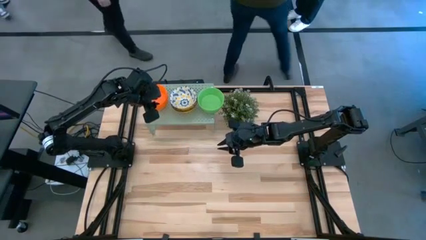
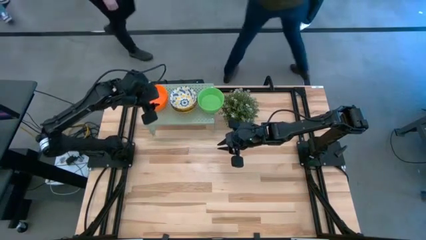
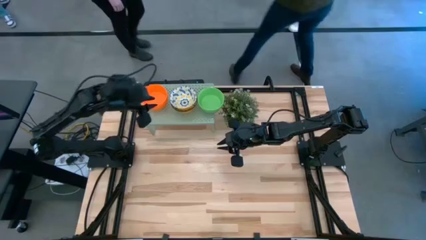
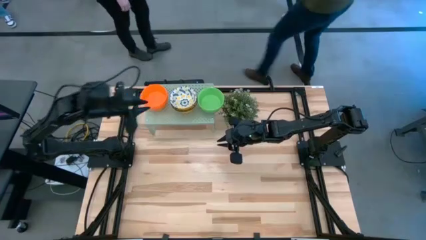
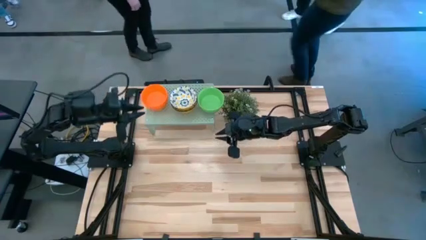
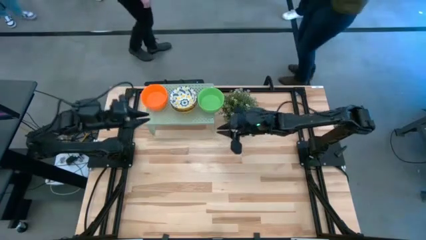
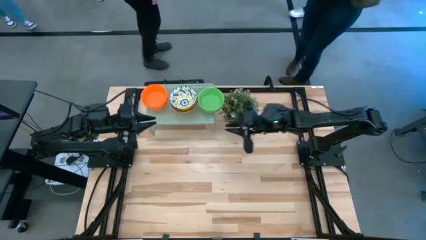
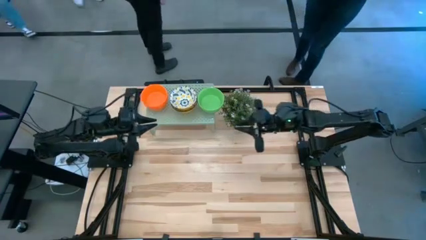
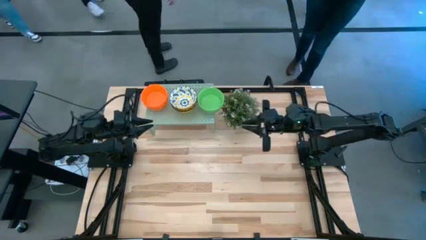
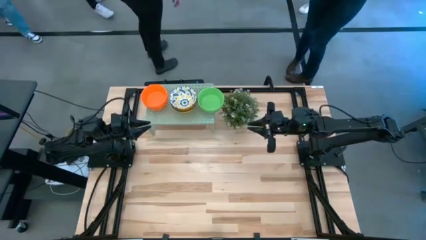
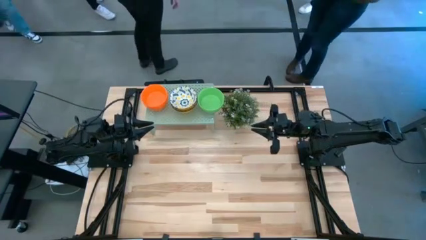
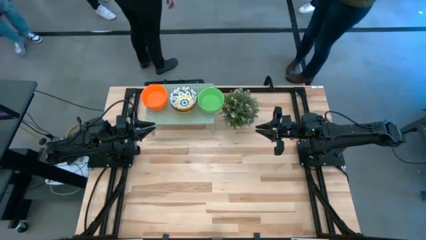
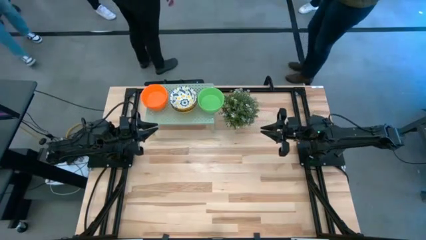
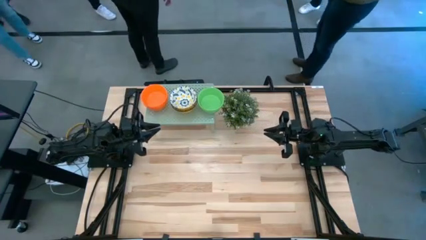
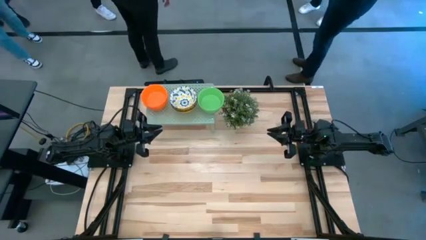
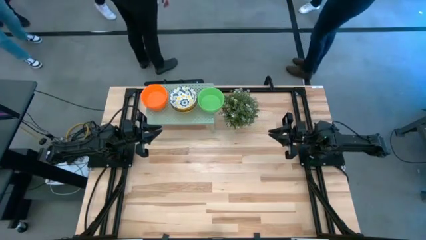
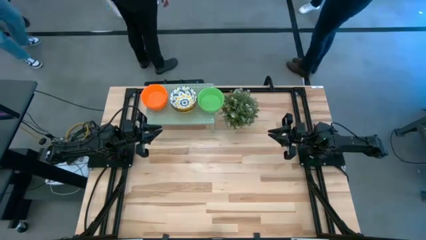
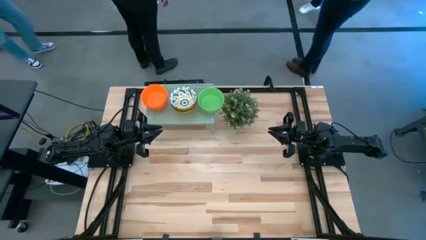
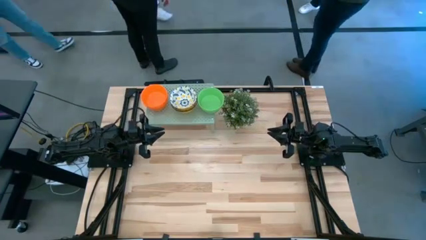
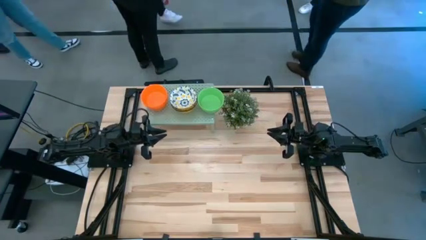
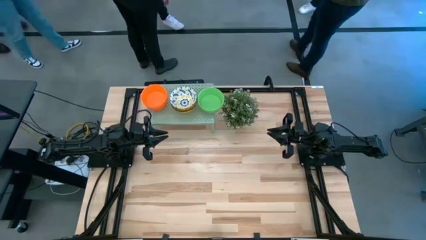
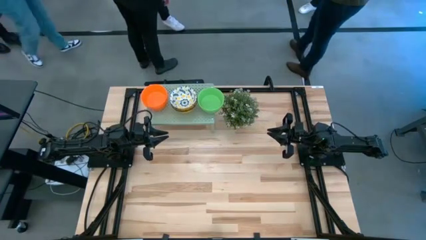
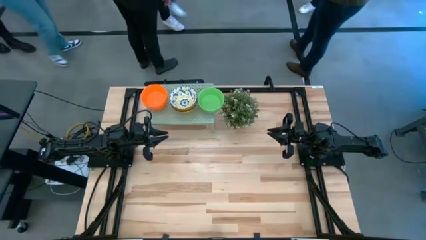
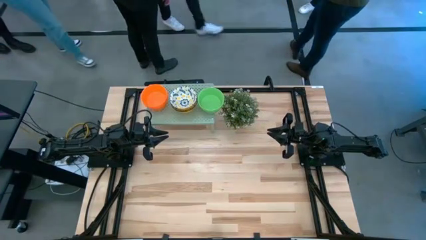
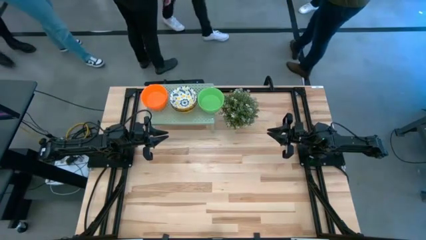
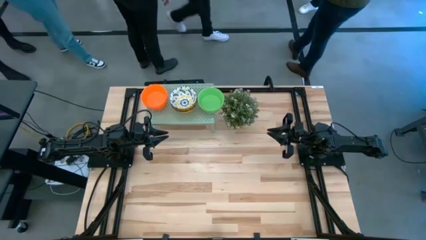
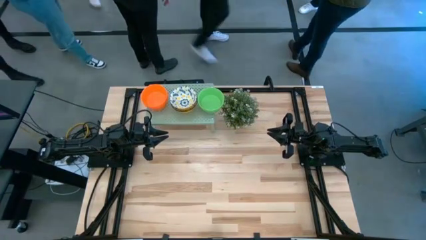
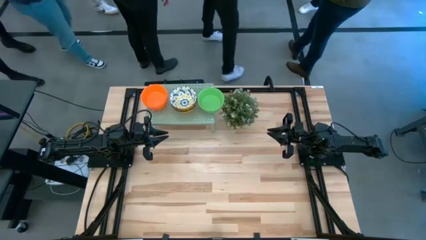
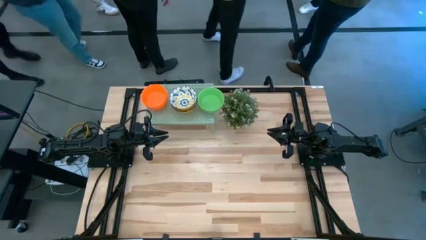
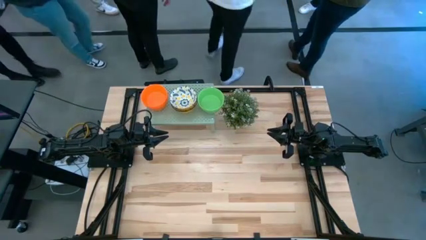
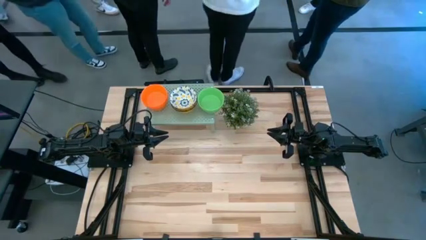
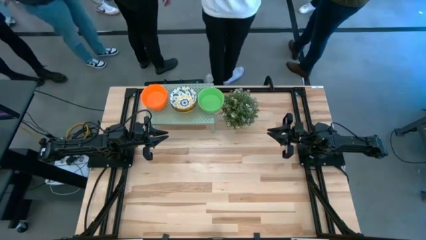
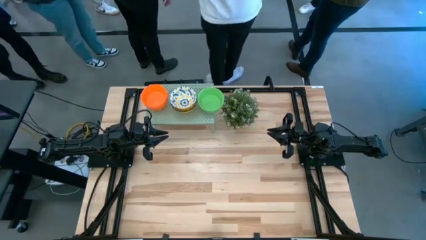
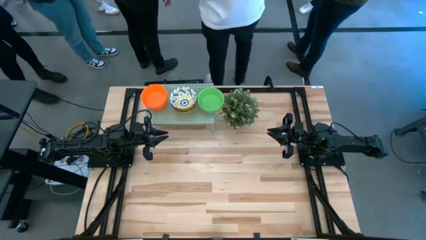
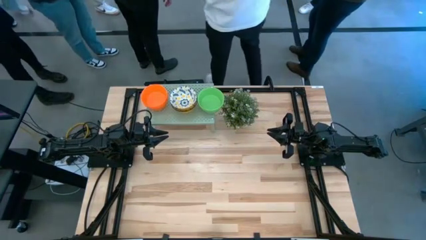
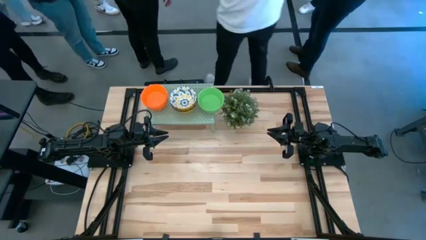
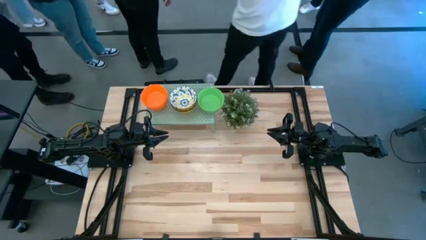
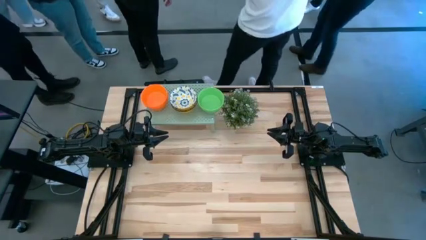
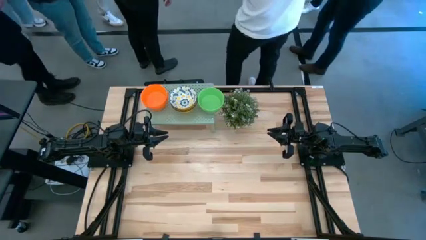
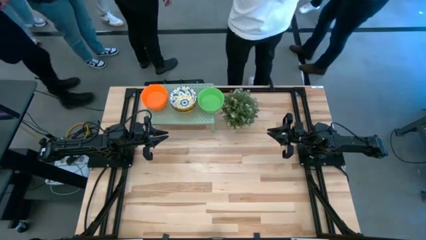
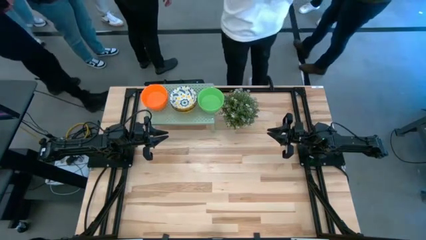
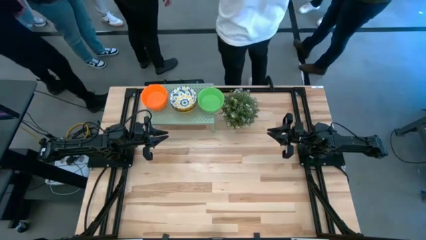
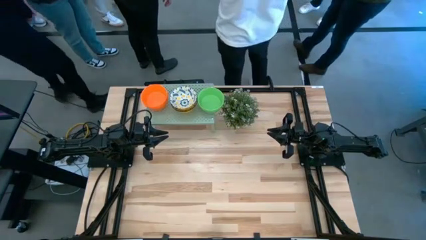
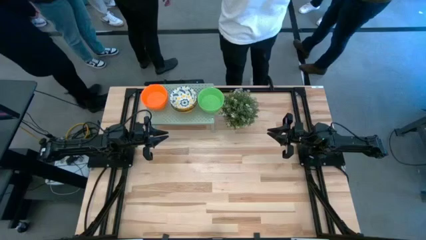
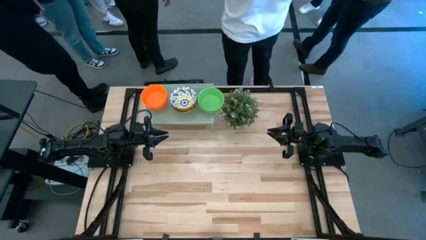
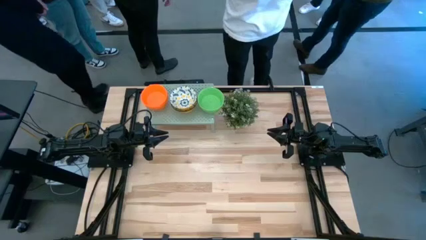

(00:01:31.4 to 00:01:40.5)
Task: Pick & Place Mini bowls
Return to Home Position

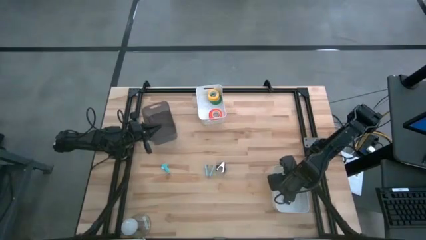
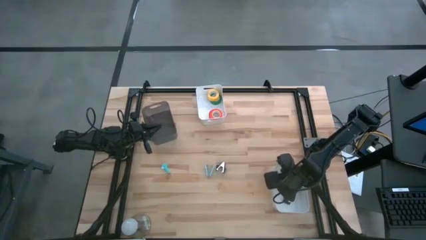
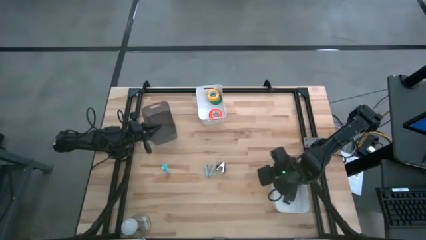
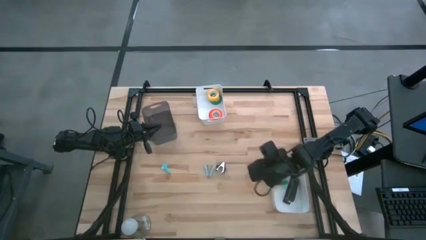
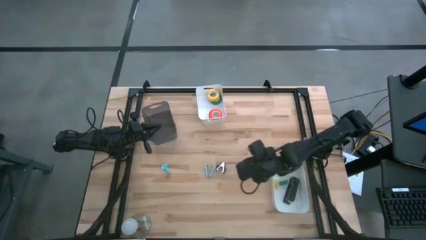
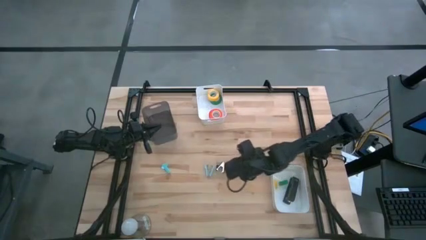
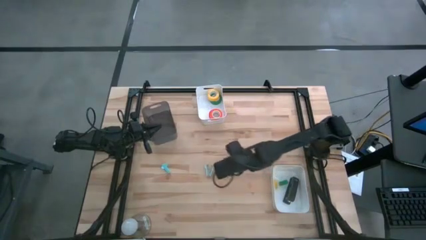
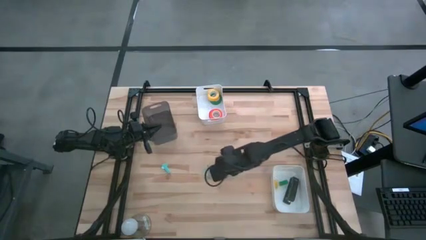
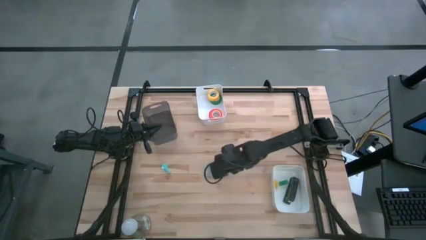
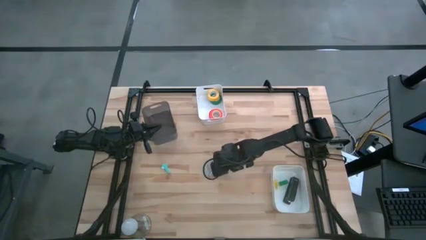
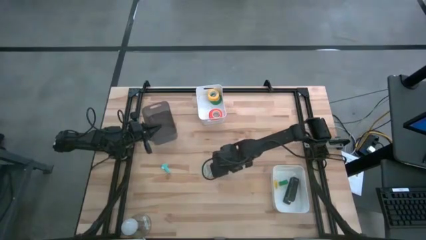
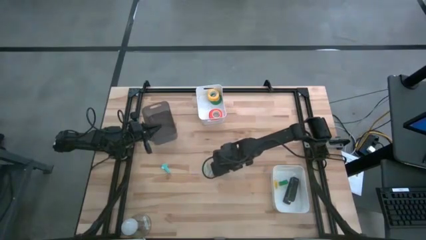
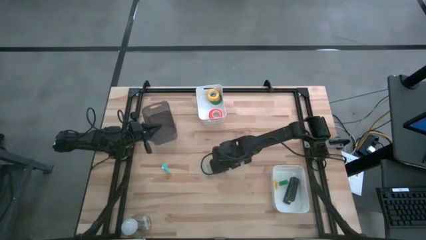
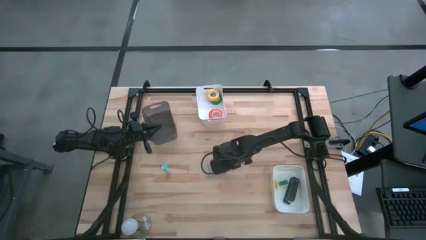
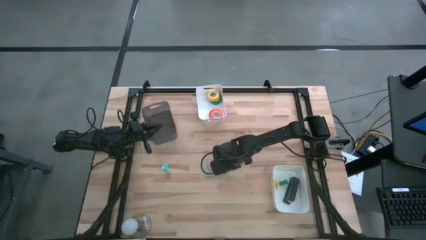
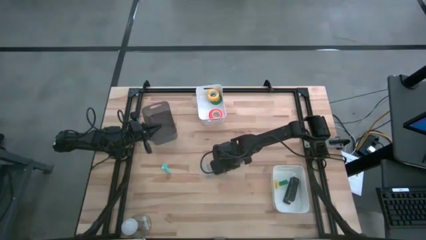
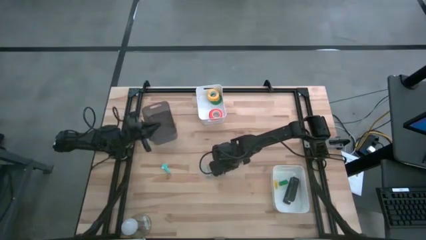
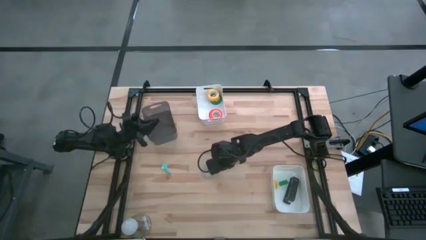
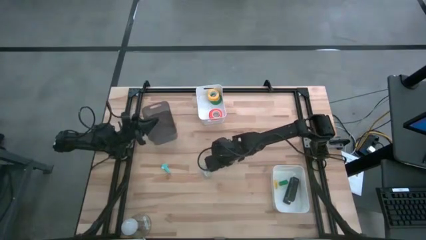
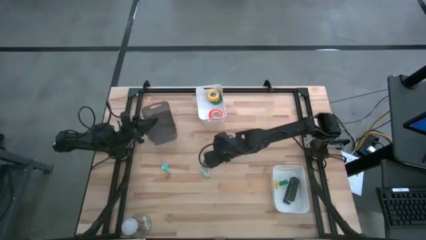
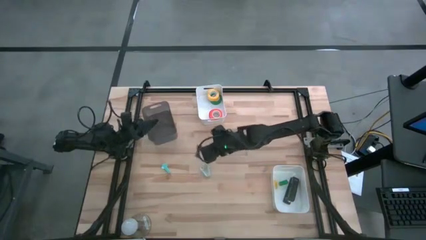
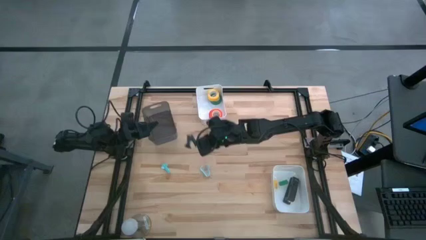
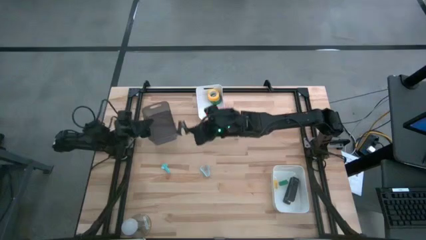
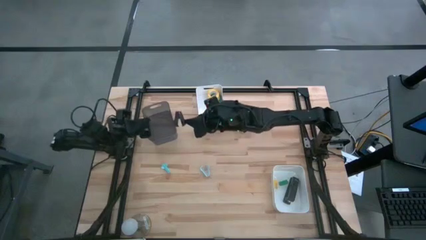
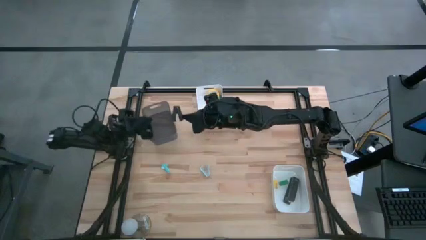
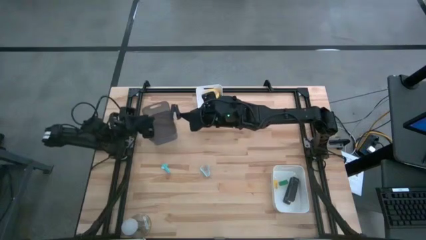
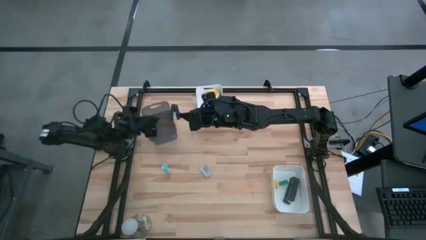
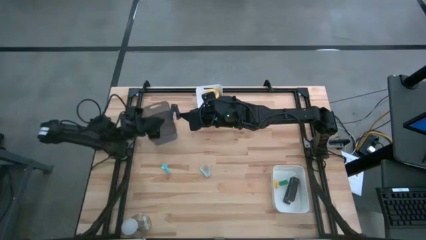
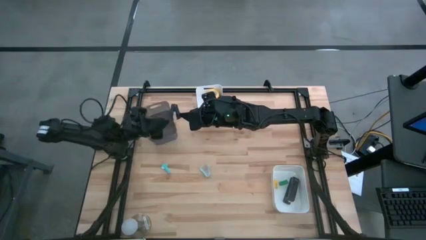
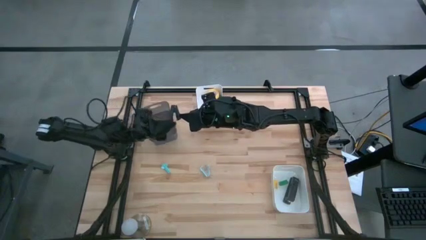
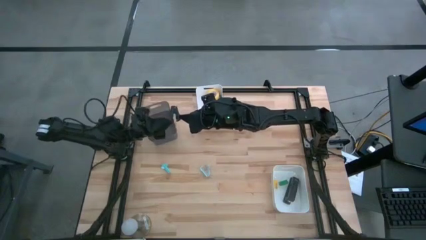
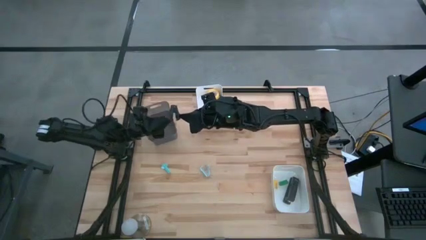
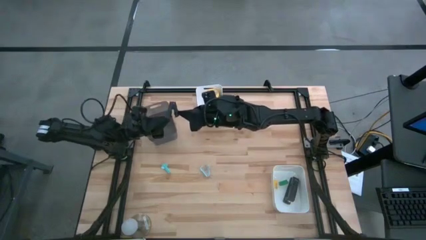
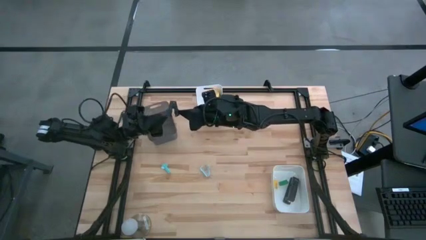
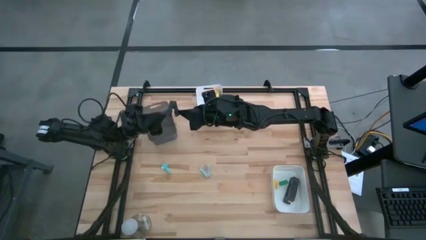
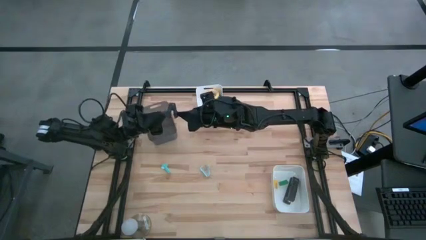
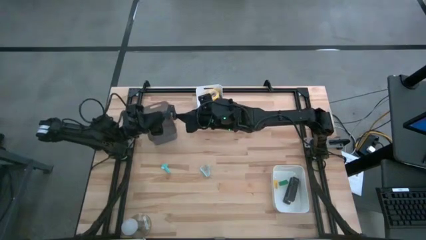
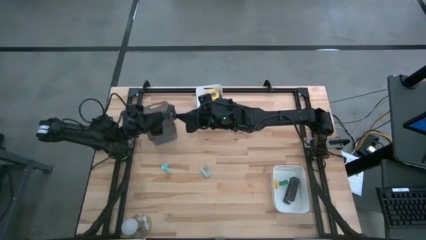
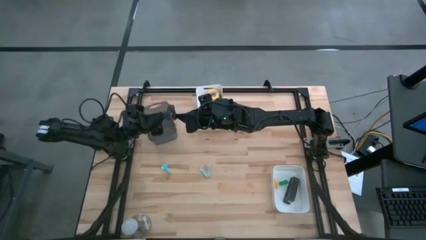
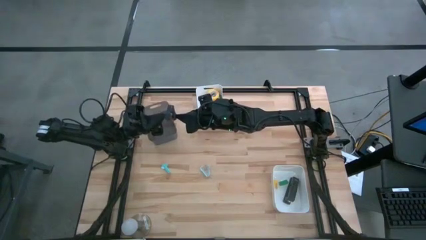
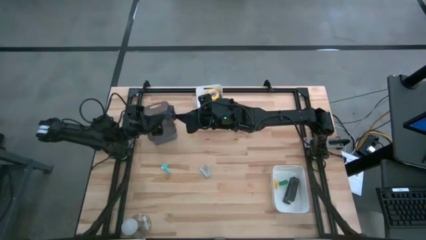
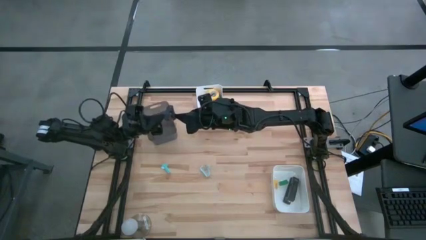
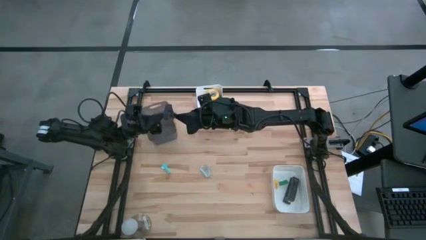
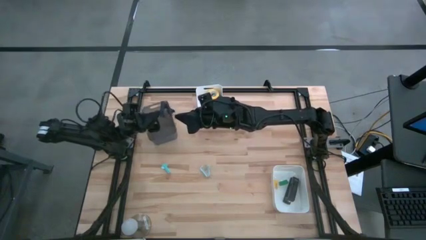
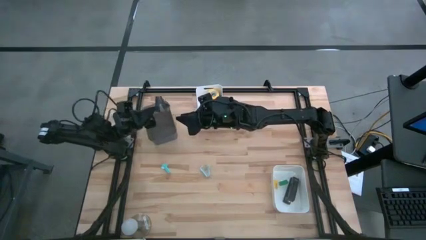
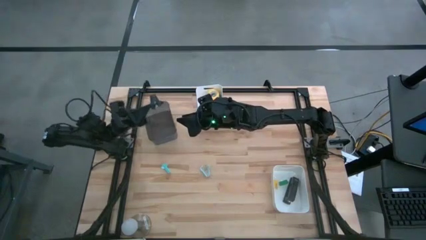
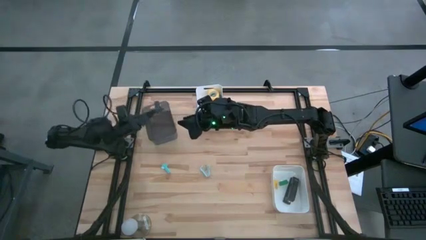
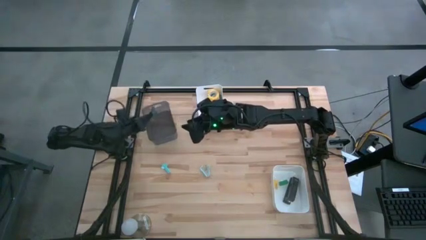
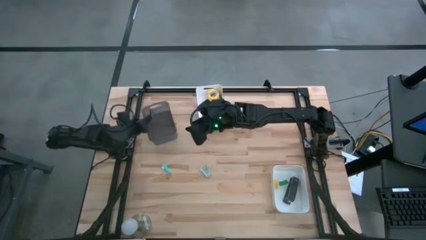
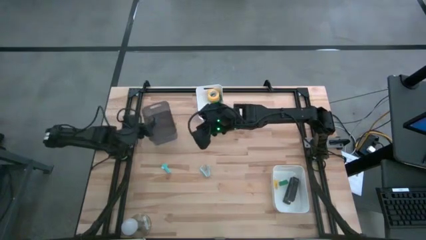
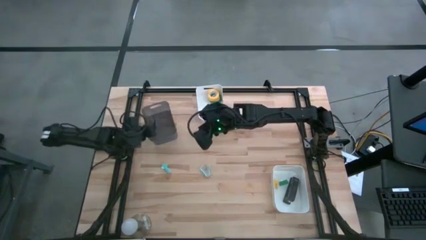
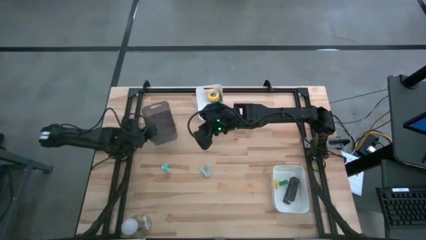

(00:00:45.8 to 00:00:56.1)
Task: Pick and place Stapler, Stapler remover, tape
Put the black staple remover into the black bin
